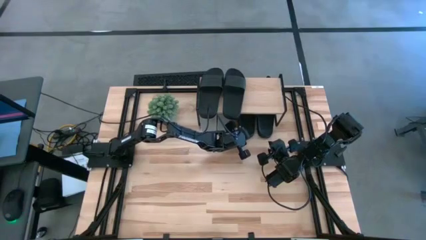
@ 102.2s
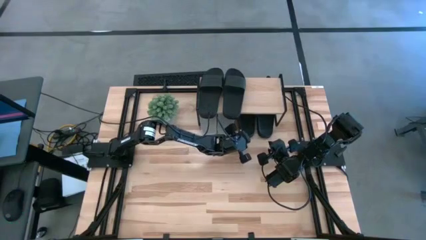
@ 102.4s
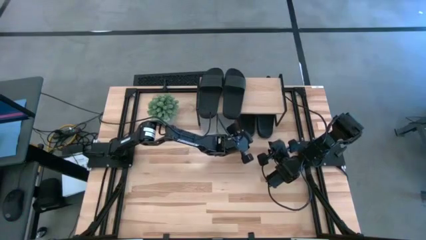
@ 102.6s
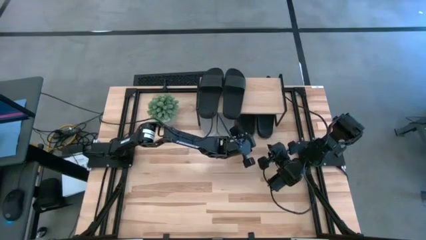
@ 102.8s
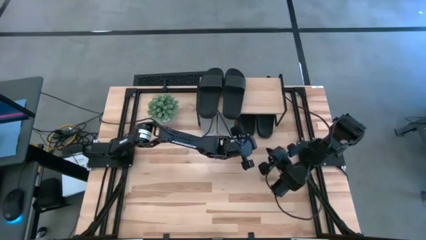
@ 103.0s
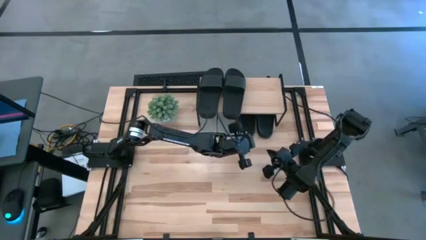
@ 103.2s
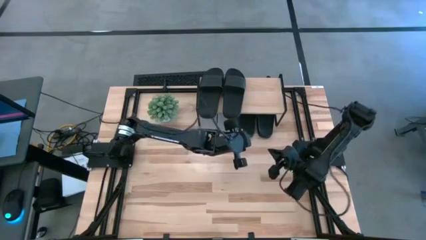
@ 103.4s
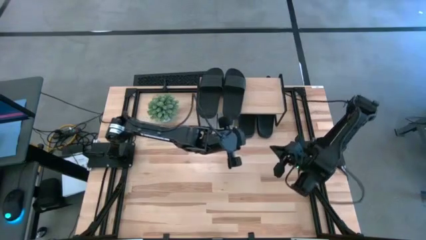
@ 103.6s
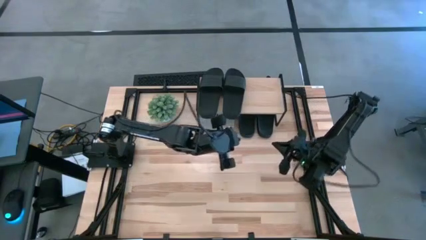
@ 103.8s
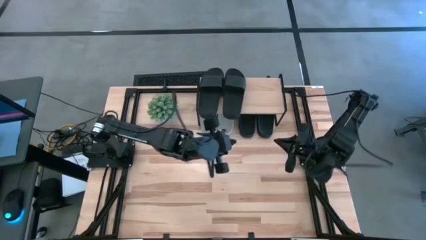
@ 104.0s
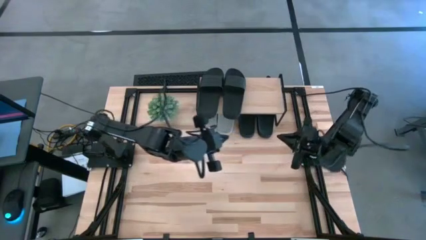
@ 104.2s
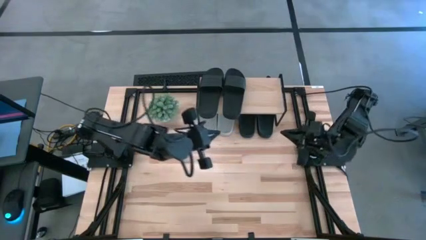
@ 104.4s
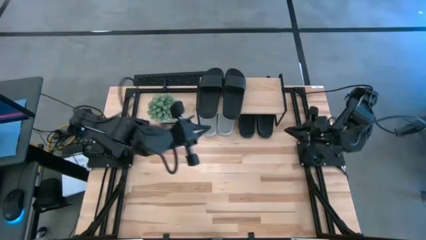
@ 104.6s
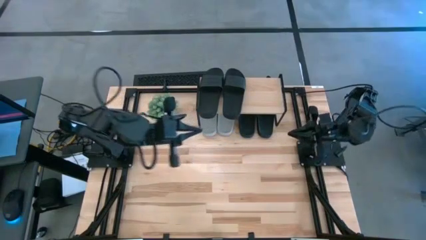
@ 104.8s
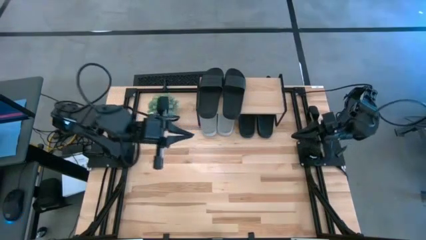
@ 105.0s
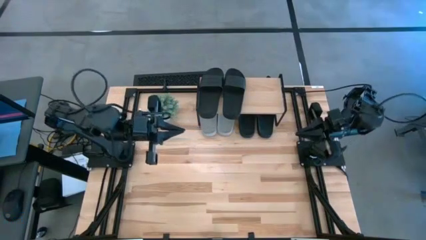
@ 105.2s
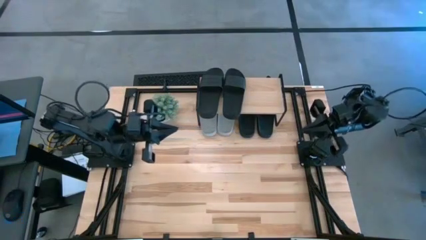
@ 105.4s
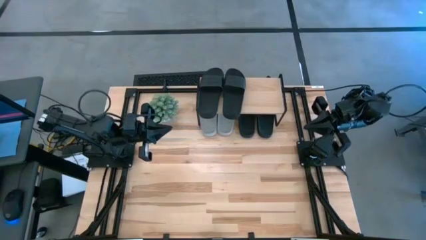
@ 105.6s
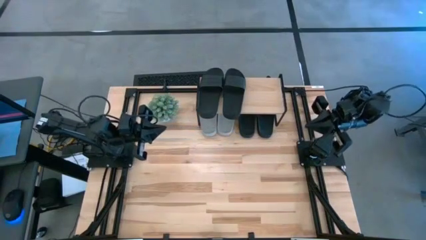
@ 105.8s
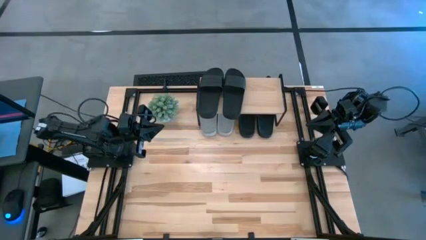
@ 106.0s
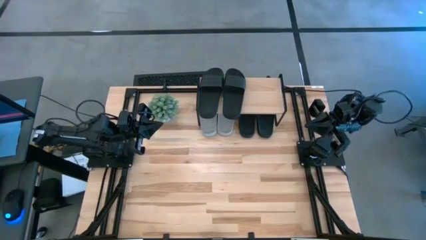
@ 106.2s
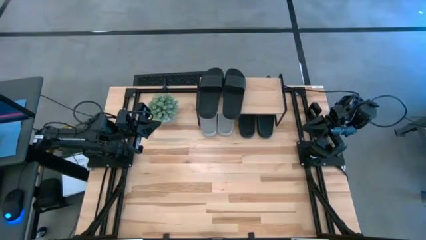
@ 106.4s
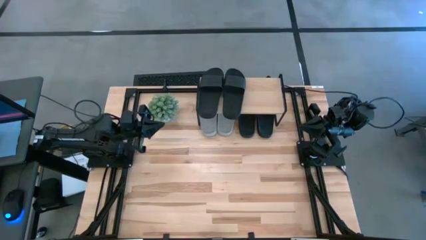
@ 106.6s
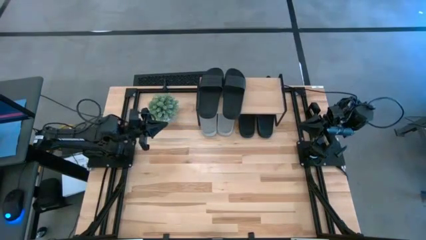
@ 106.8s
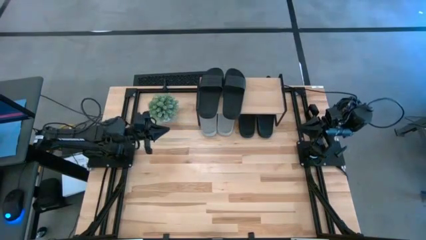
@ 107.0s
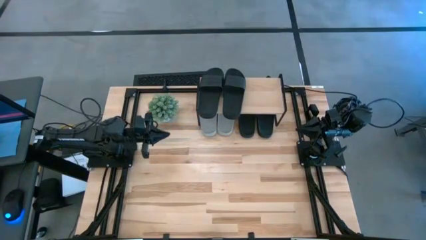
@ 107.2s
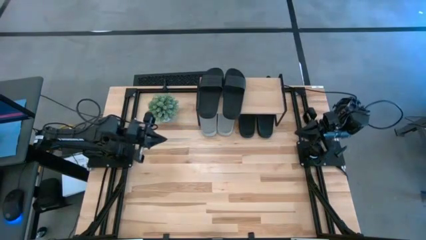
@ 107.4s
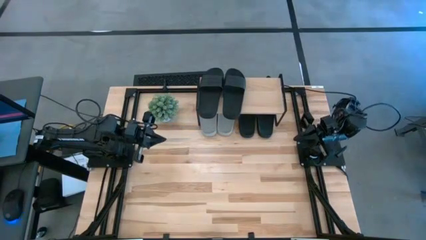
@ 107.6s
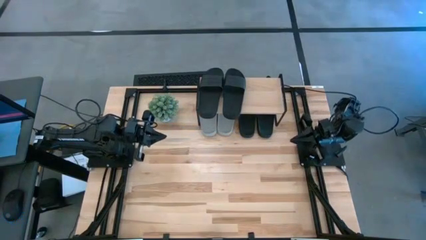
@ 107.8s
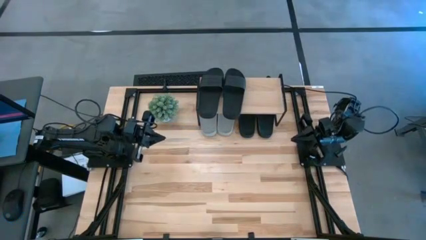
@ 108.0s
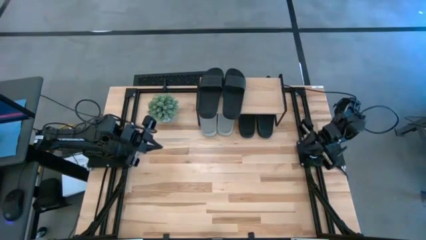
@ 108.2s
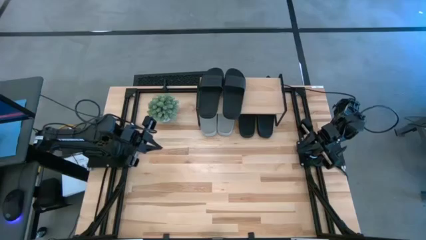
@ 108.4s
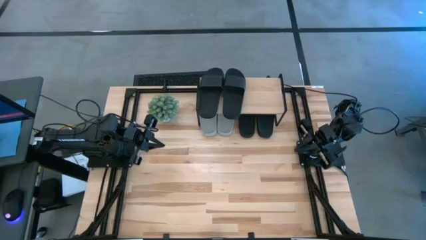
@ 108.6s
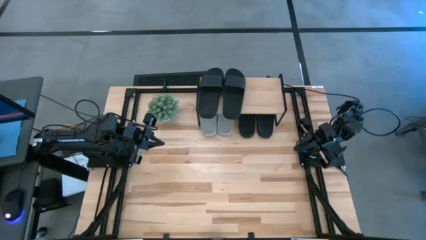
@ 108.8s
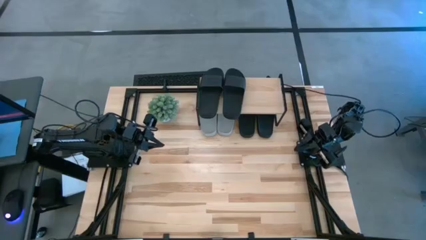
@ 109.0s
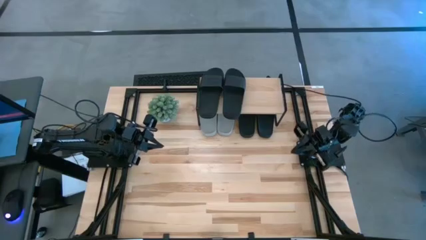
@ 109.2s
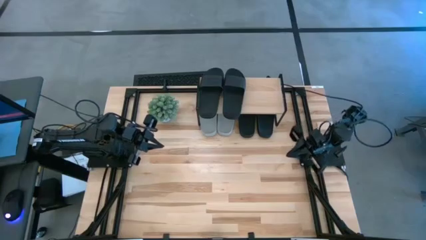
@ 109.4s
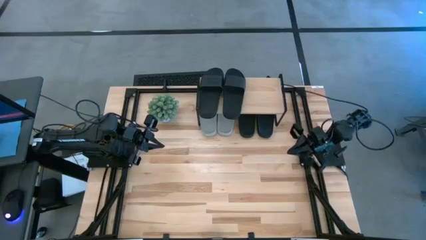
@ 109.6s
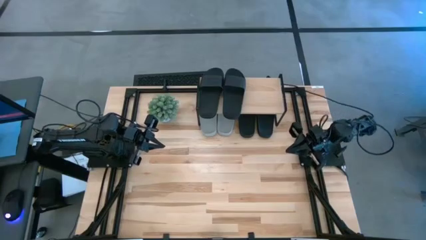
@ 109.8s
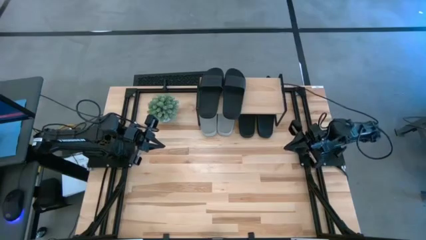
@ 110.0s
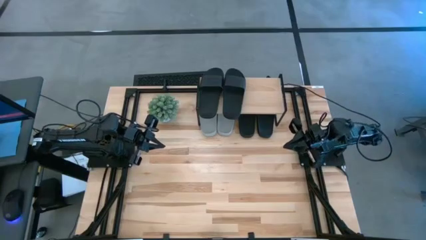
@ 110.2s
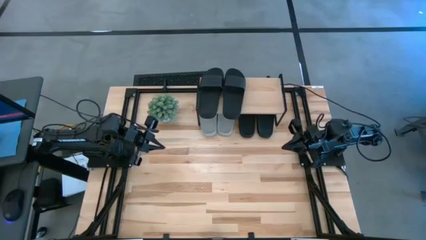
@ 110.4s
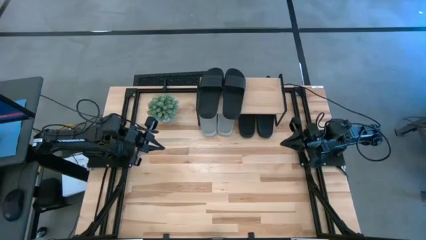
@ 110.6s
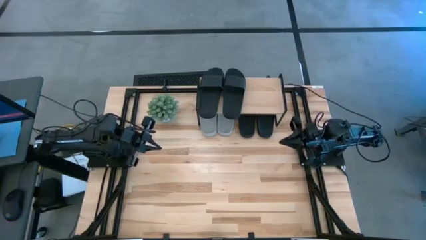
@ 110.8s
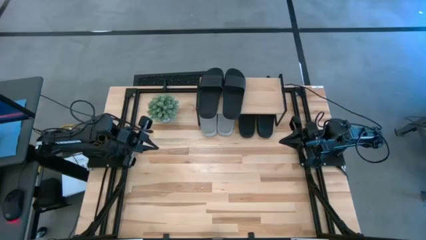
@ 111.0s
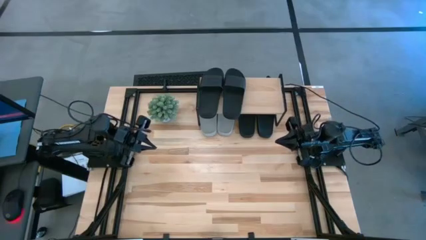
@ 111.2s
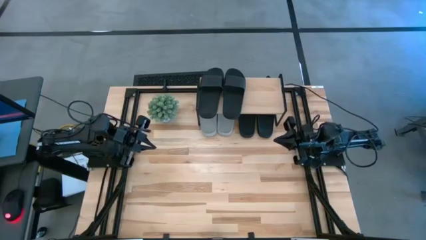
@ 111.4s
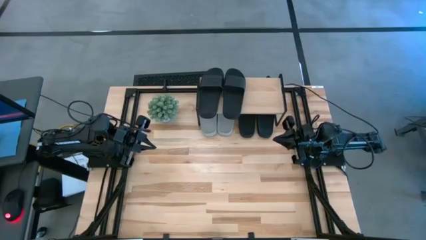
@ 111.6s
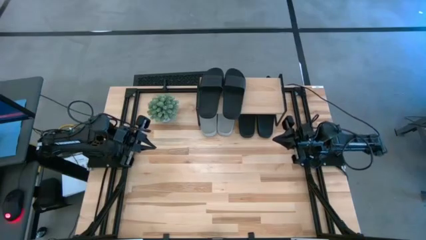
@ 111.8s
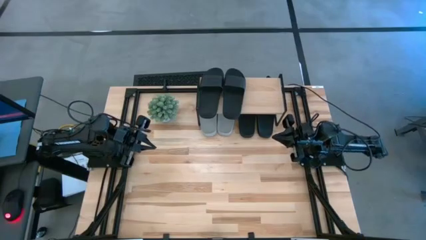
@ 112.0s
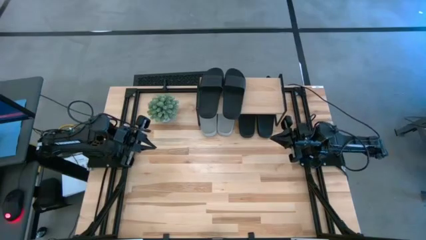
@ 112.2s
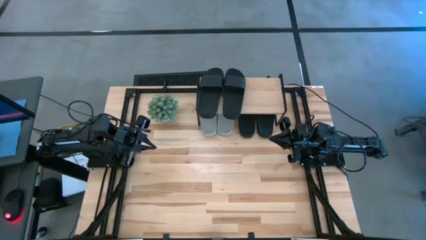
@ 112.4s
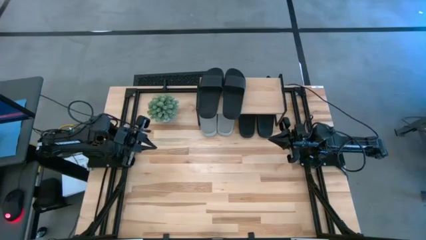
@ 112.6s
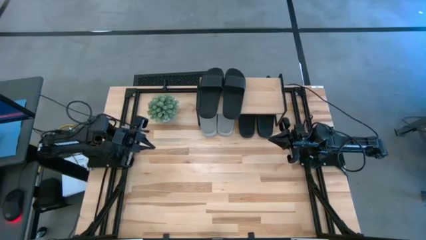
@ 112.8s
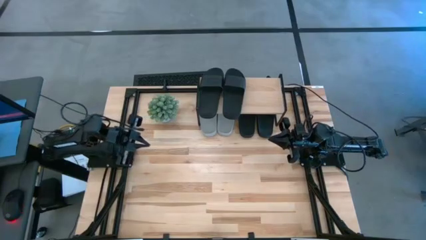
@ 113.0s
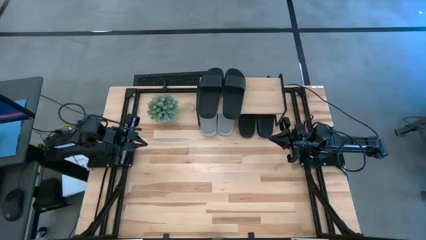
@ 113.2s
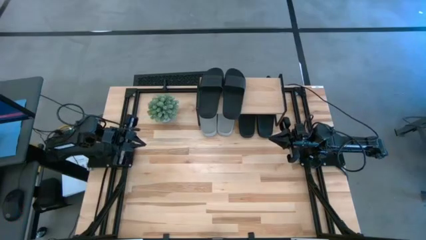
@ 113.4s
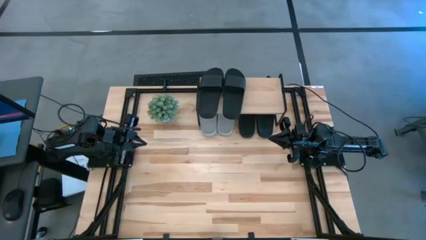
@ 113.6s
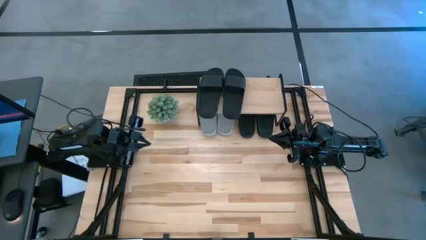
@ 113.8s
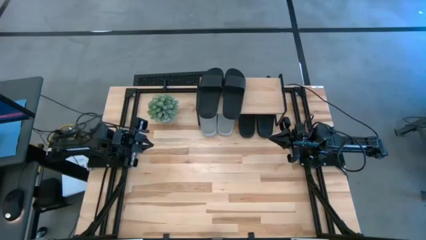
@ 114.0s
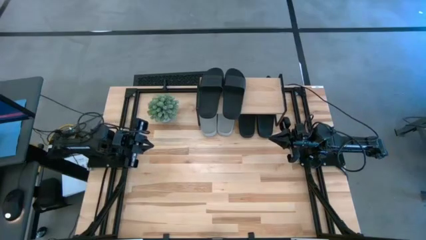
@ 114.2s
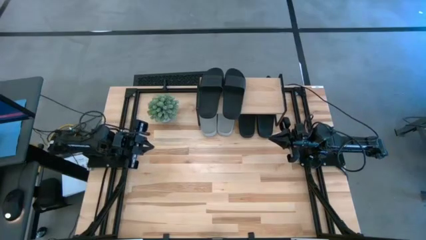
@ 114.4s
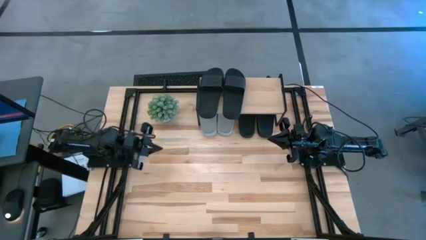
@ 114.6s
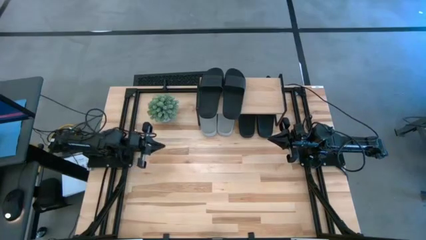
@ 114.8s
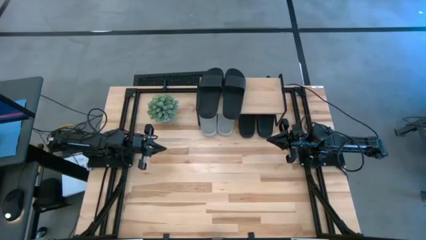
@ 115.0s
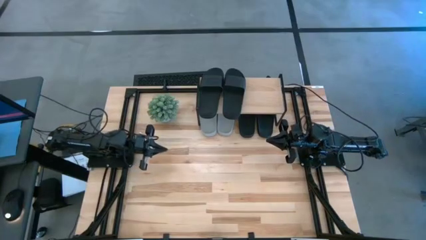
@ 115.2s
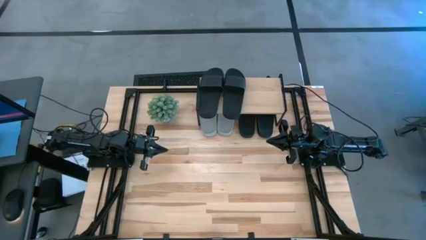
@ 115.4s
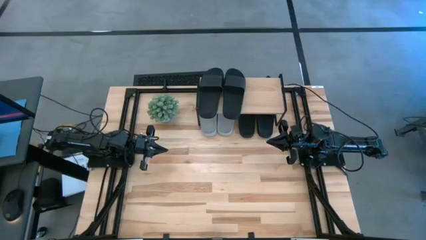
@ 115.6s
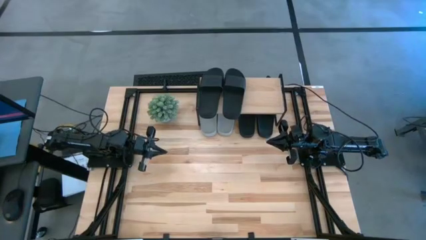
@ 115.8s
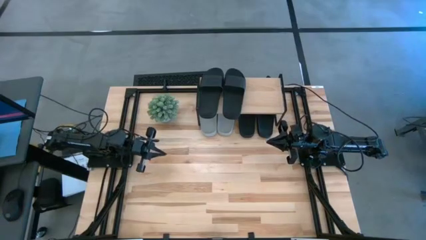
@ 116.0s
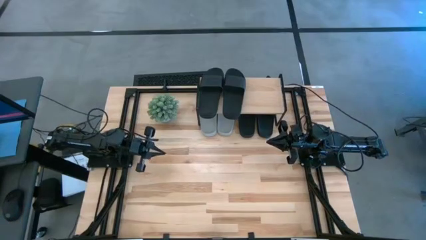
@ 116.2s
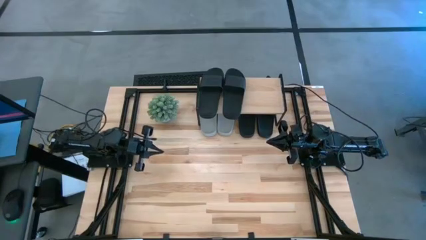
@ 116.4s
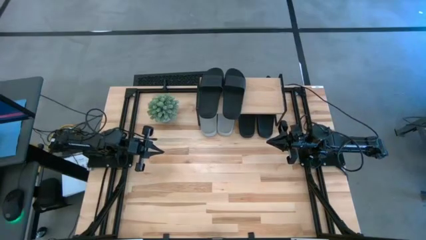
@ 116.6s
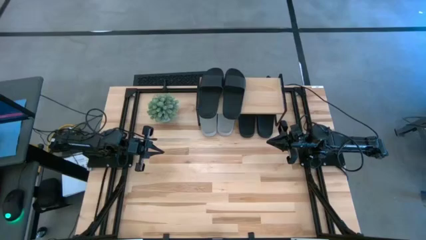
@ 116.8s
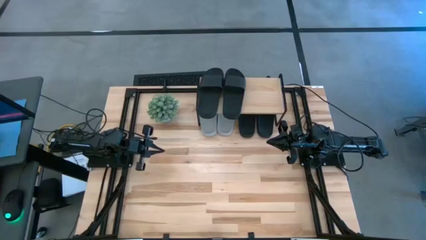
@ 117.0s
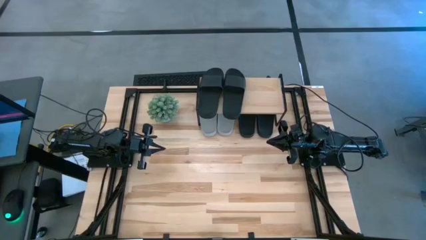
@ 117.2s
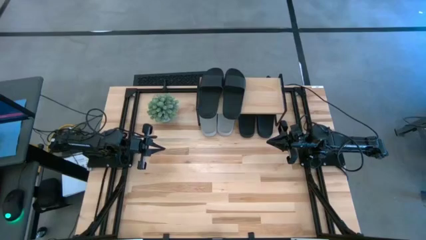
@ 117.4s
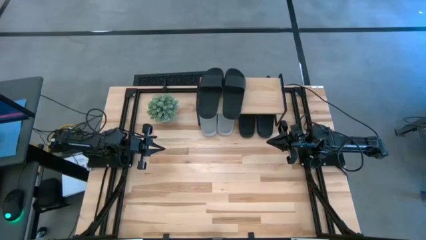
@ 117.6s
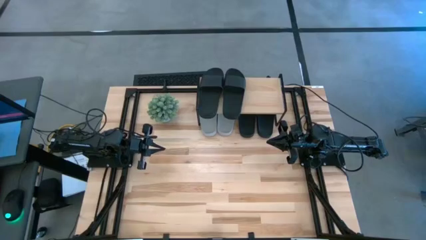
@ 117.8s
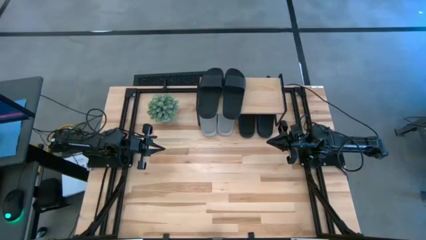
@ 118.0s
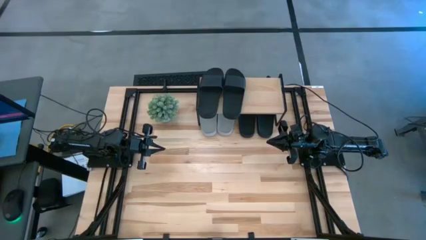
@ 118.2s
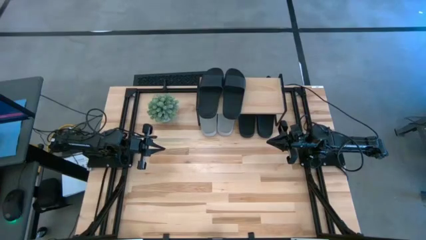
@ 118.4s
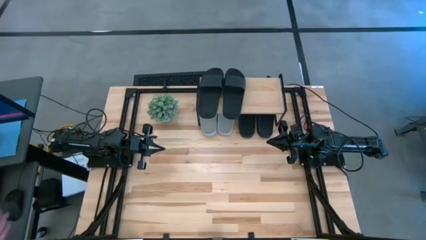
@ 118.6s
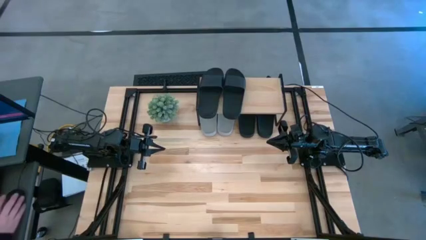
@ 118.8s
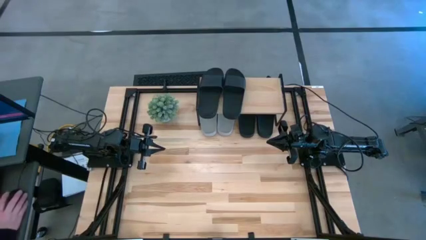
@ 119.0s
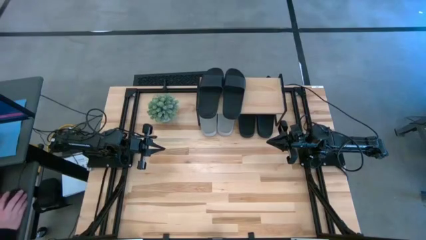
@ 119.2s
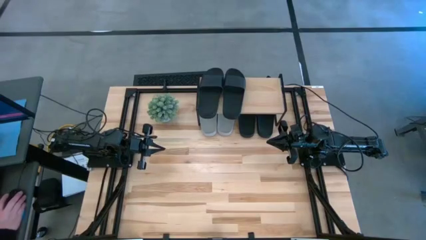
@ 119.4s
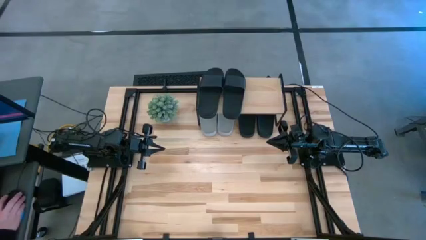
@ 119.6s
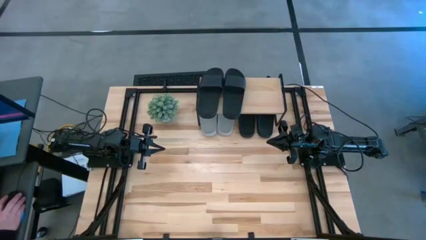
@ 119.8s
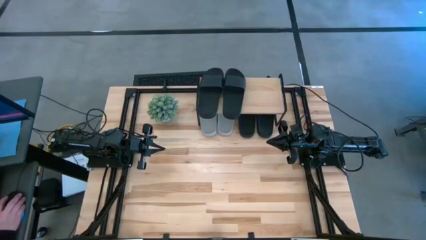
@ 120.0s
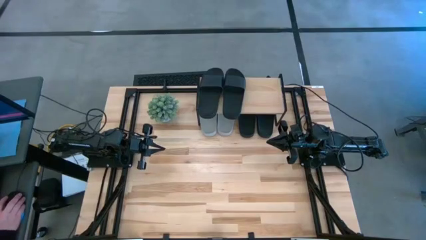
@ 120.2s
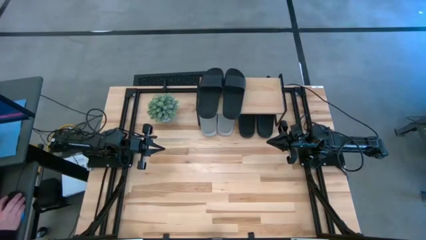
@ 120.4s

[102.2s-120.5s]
Task: Pick and place slides into the shelf
Return to home position
